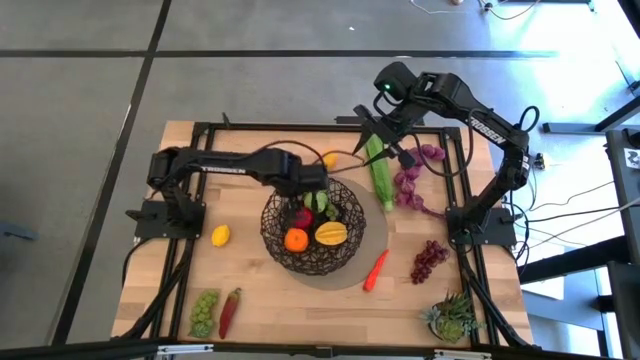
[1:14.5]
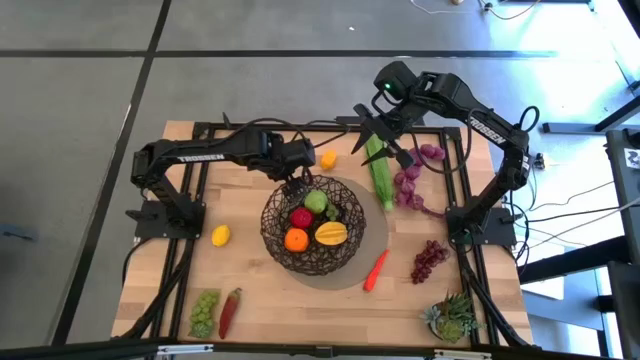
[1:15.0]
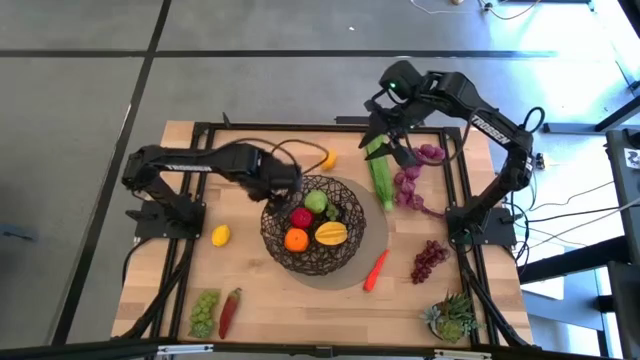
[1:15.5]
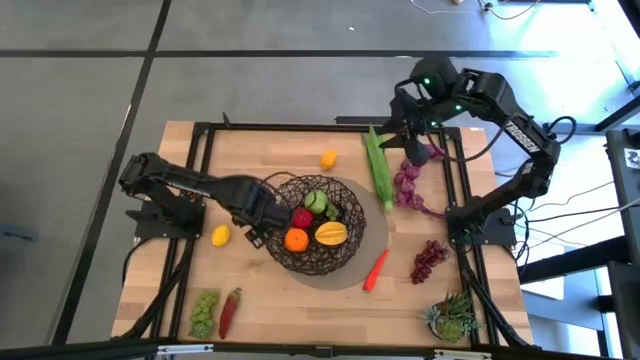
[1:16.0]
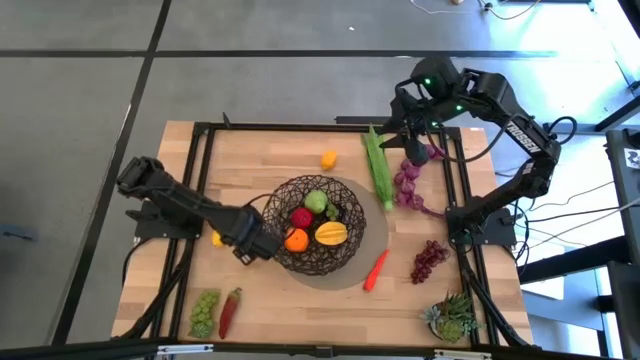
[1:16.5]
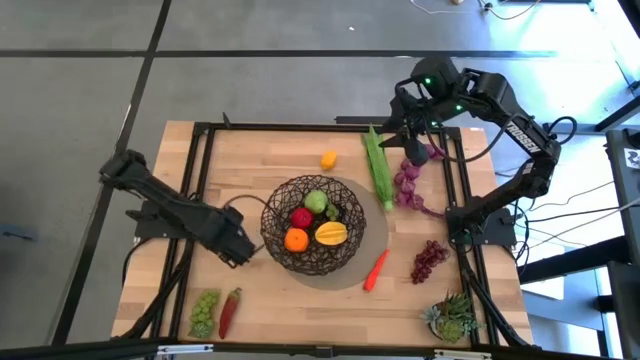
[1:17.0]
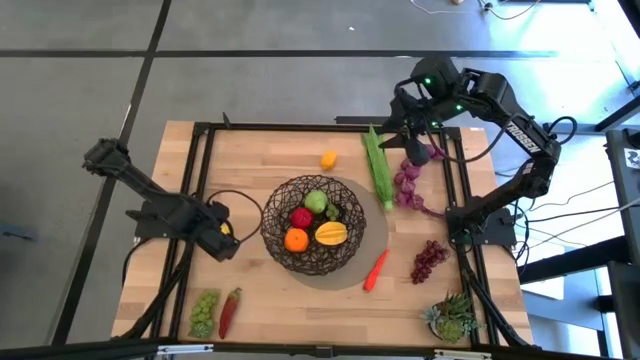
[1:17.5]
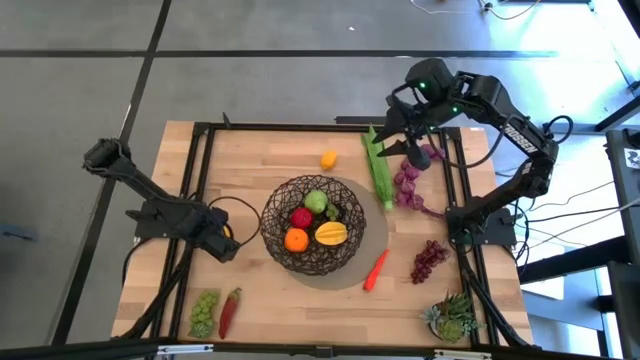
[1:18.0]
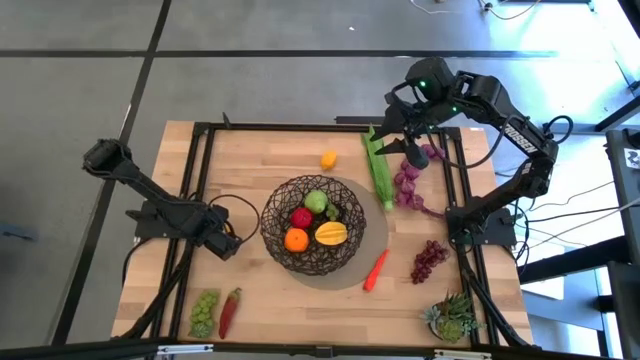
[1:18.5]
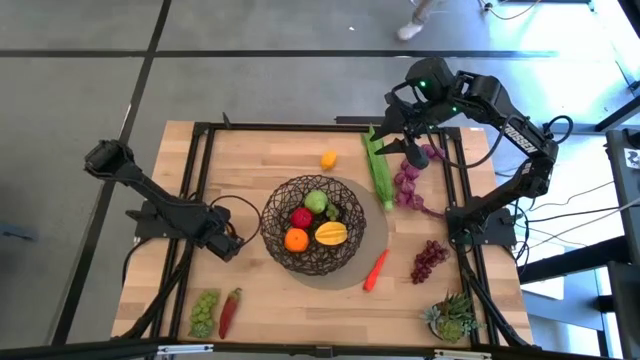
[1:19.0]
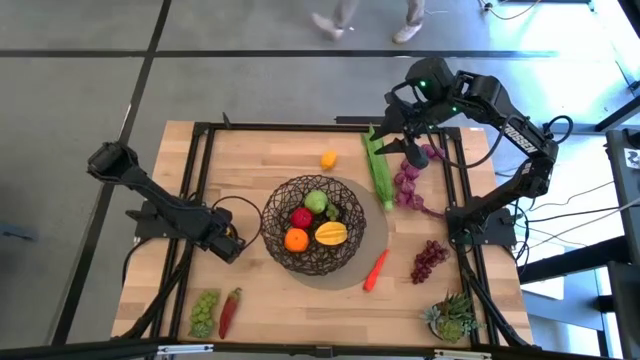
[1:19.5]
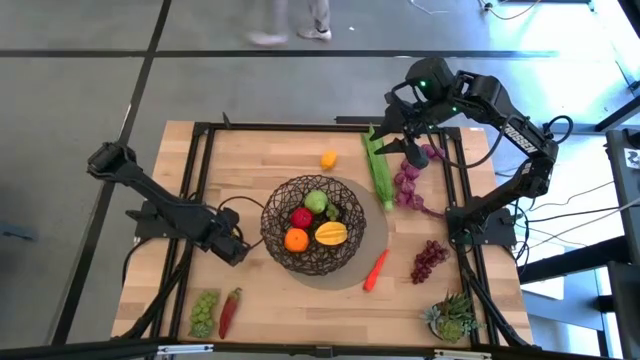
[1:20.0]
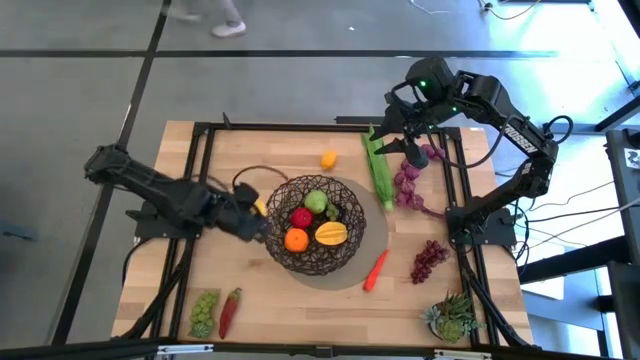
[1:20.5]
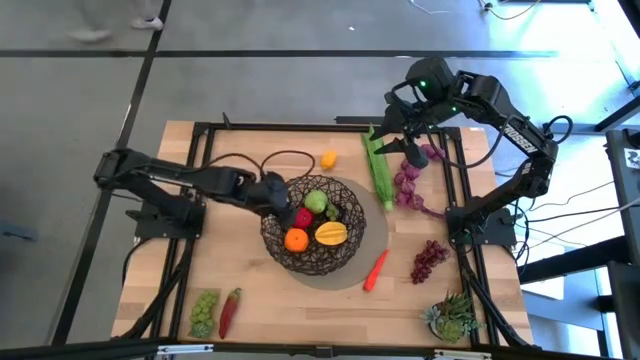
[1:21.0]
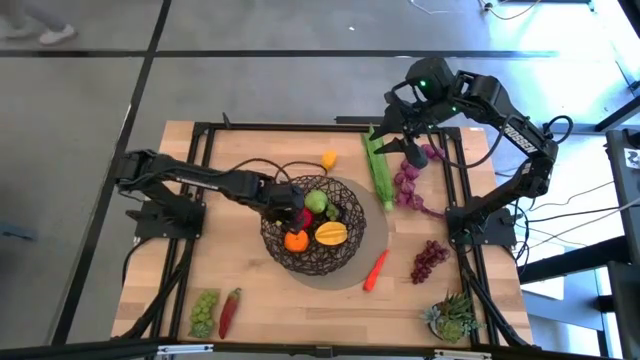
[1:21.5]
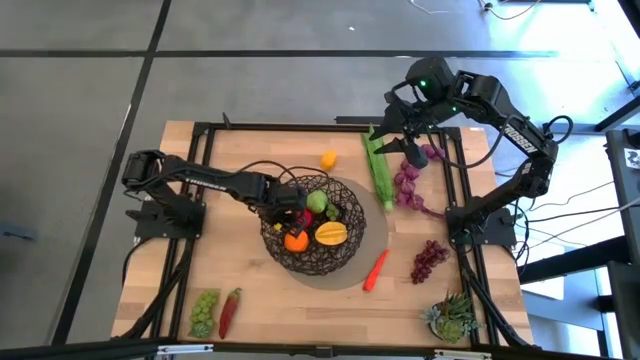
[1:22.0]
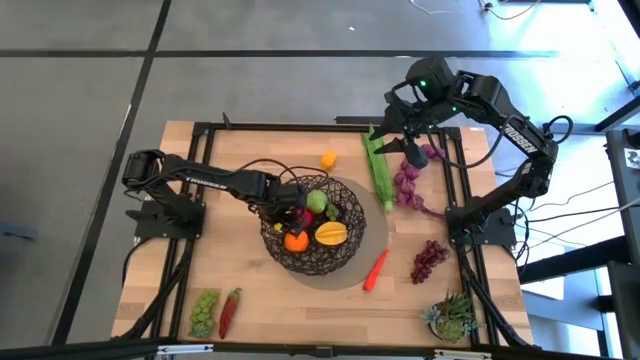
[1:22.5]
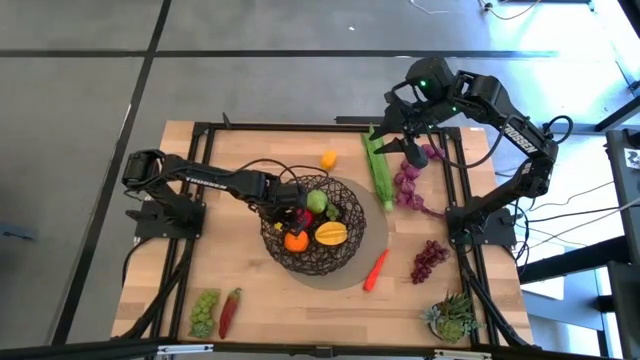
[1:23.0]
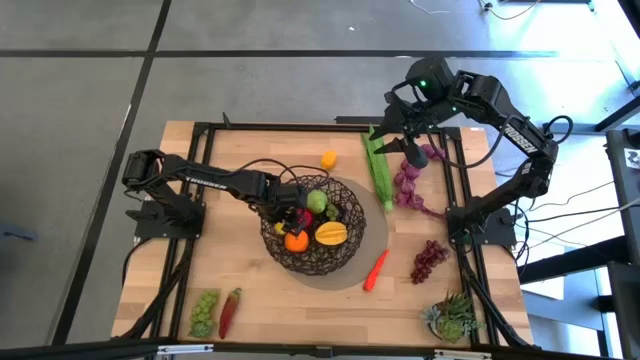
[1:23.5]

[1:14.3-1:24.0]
Task: Build produce basket
Put the bottom lemon into the wire basket

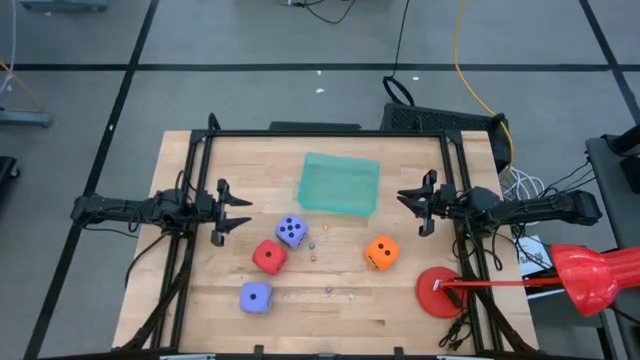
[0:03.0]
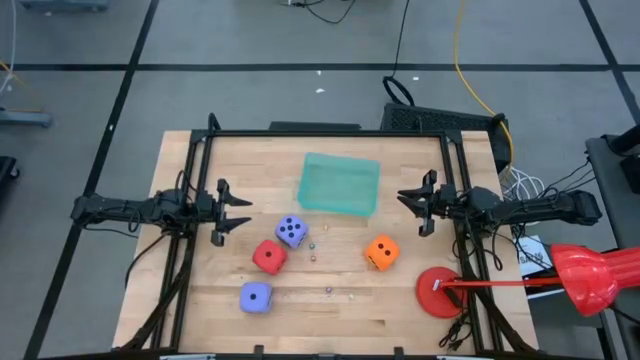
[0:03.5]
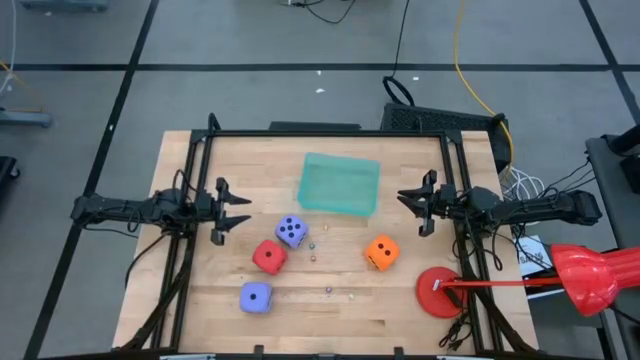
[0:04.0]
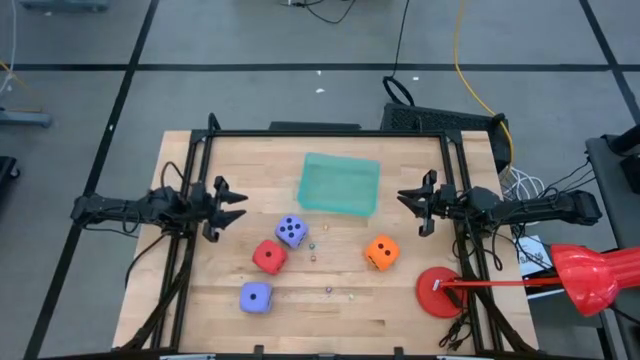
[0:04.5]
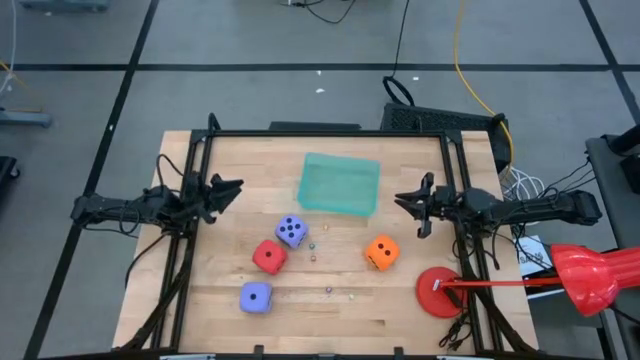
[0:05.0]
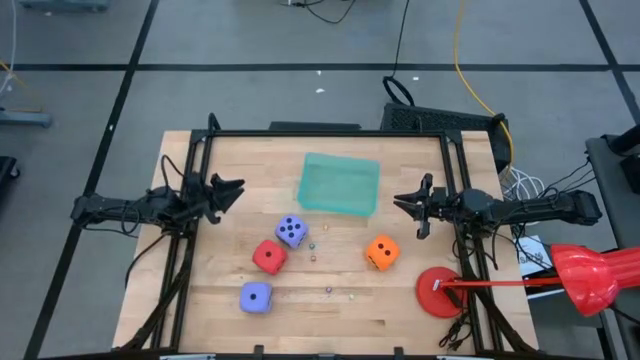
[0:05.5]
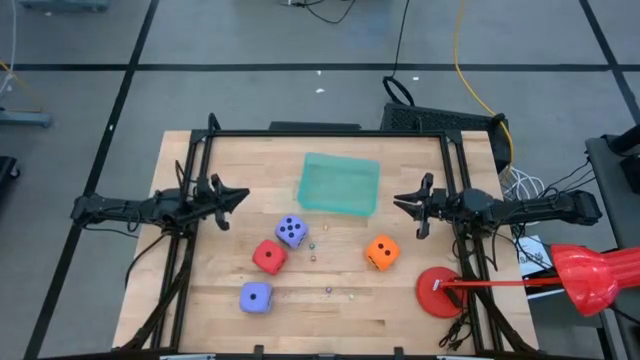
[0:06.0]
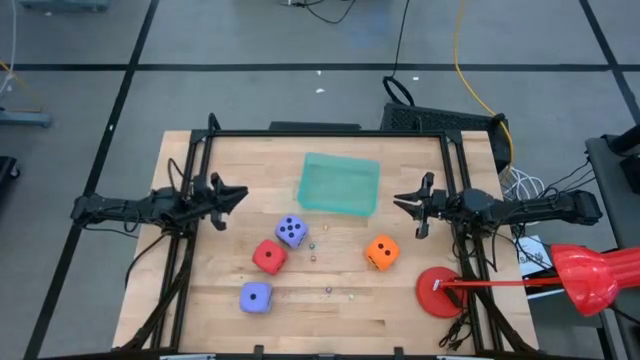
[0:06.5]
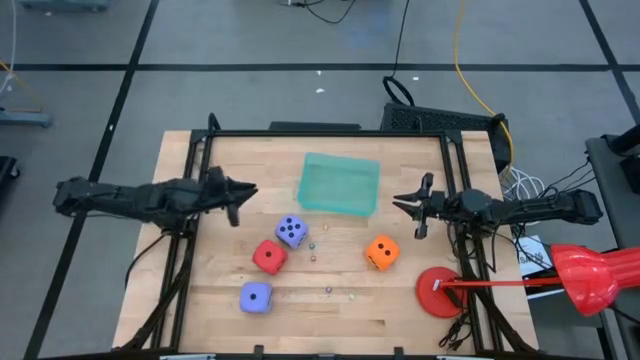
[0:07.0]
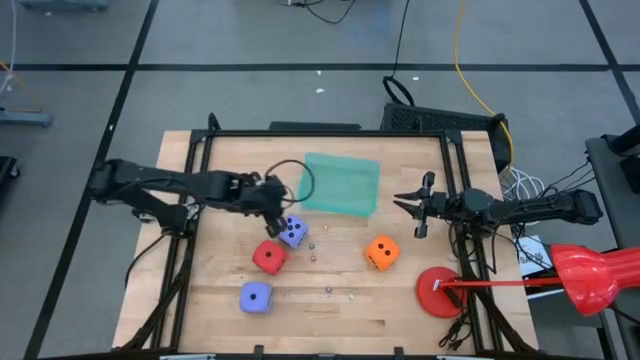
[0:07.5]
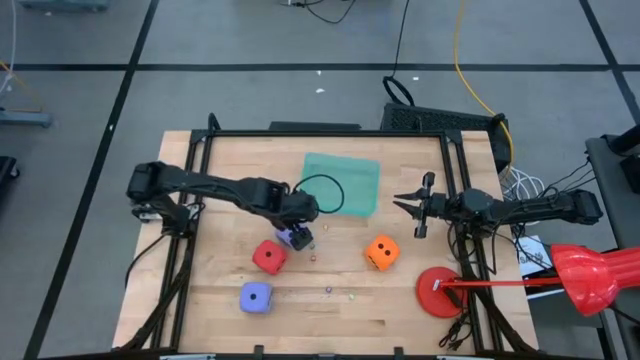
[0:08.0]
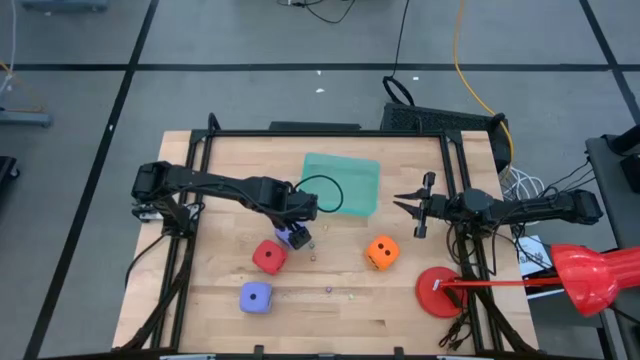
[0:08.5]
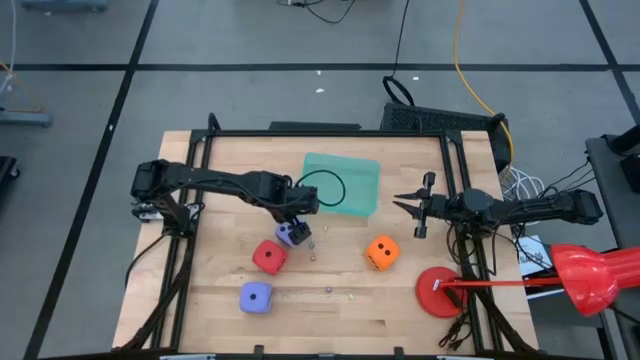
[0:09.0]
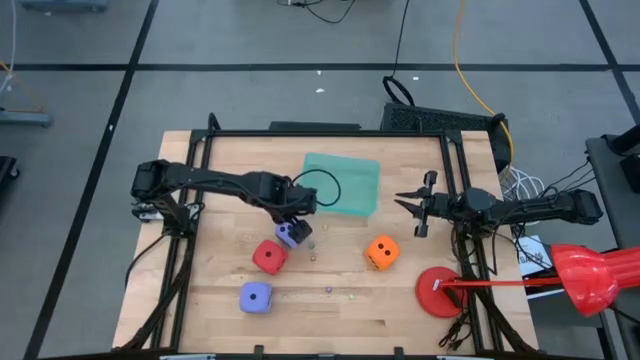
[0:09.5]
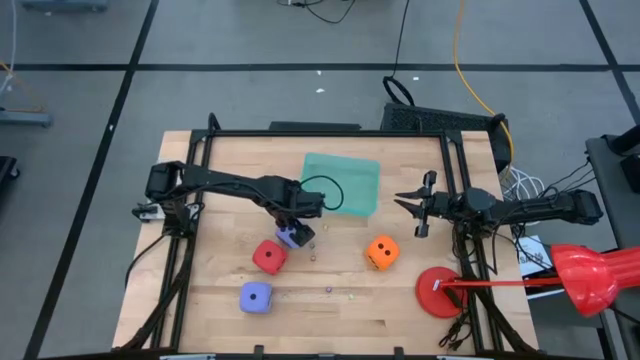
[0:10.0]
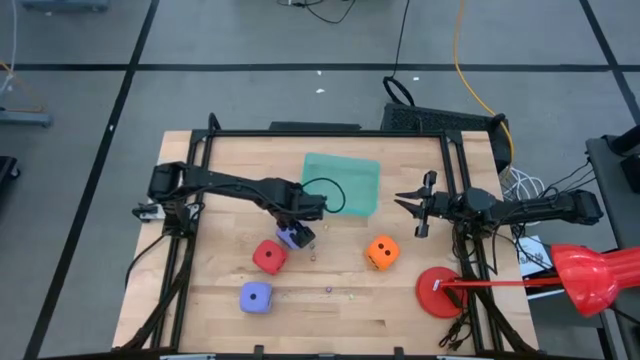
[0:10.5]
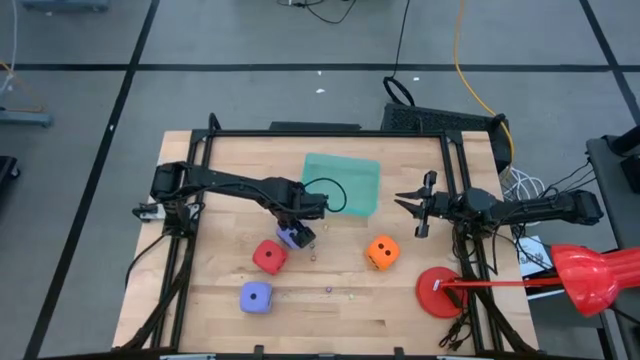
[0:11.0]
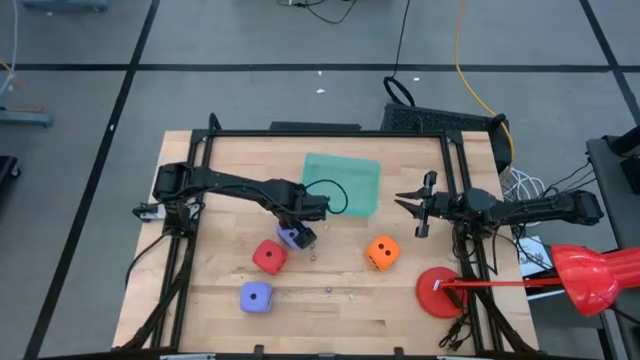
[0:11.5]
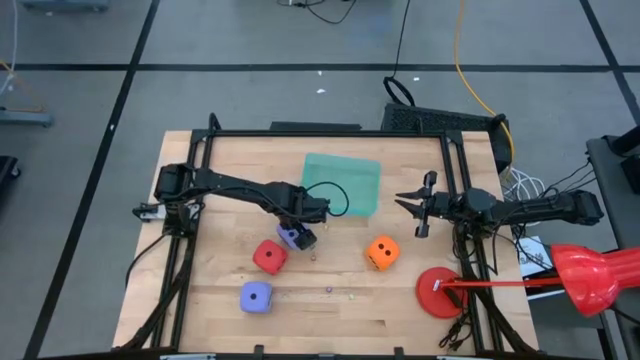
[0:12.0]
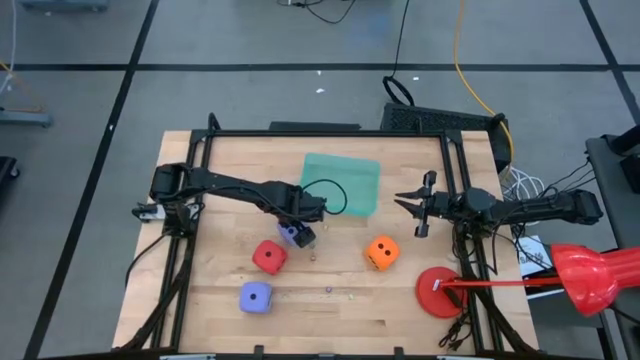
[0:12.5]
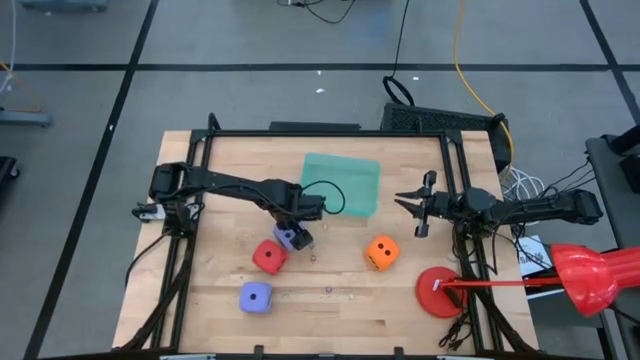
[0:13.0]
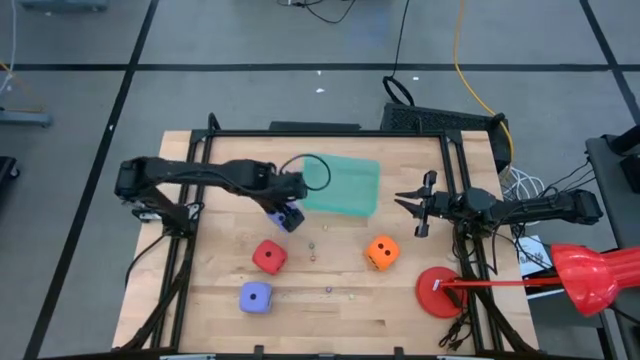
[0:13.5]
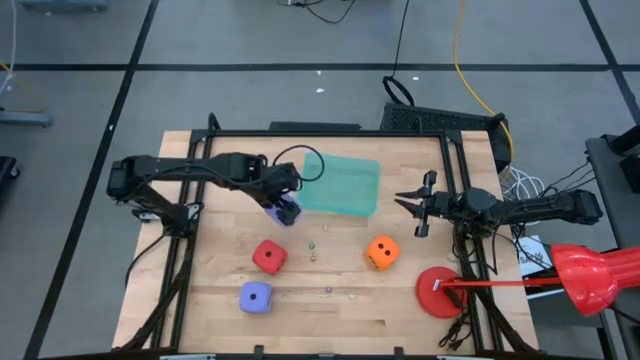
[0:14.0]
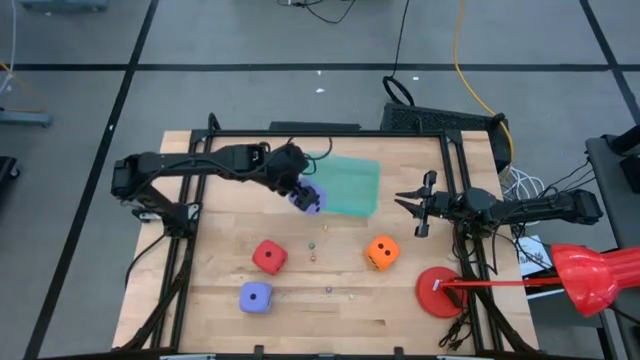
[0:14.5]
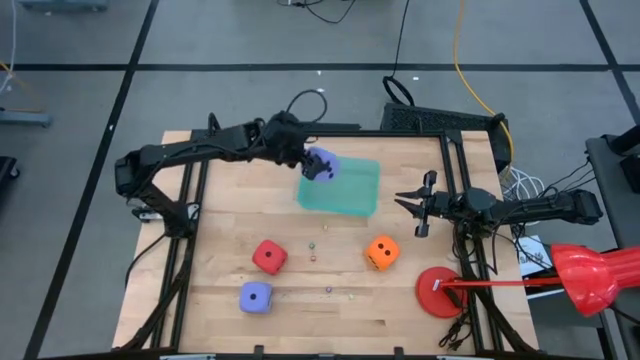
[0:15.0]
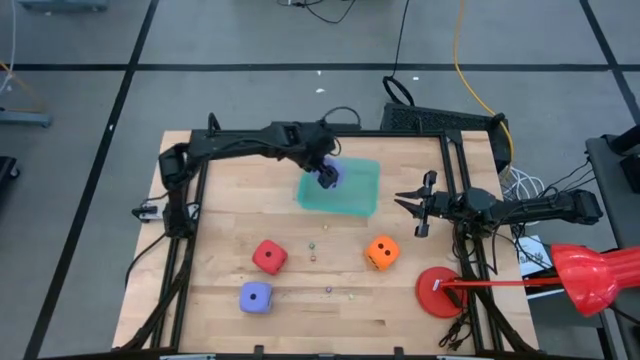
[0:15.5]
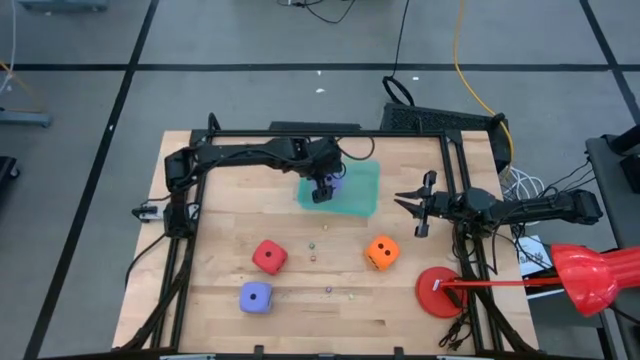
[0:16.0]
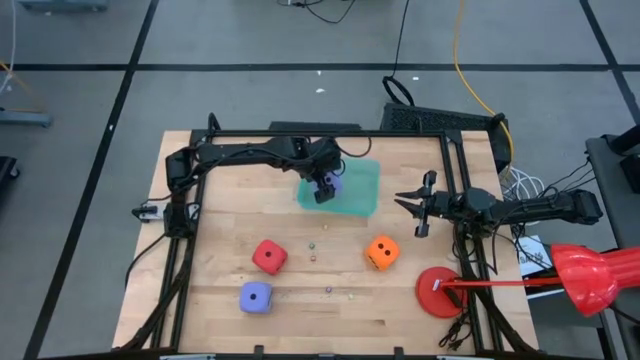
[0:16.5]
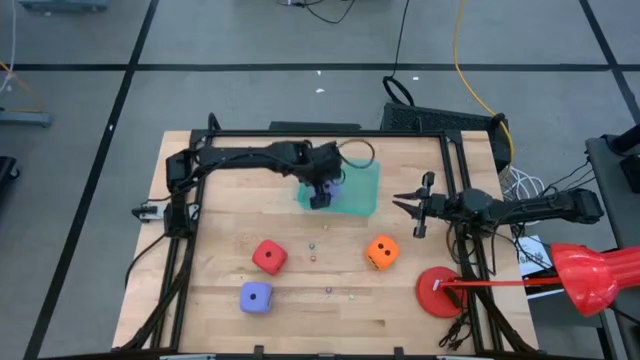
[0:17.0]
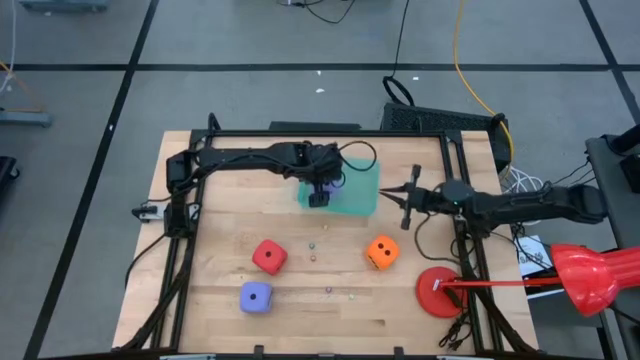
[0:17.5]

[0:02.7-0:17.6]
Task: Pick & Place Dice
Put the top large purple dice into the blue bin
